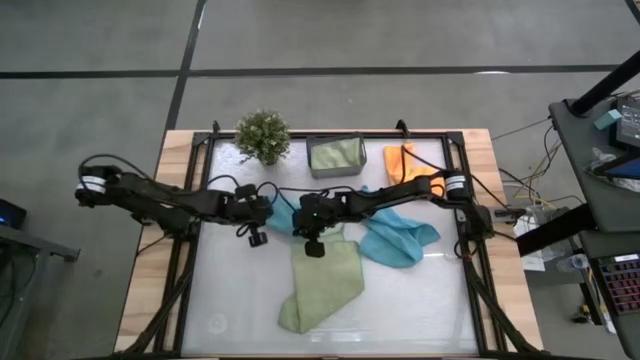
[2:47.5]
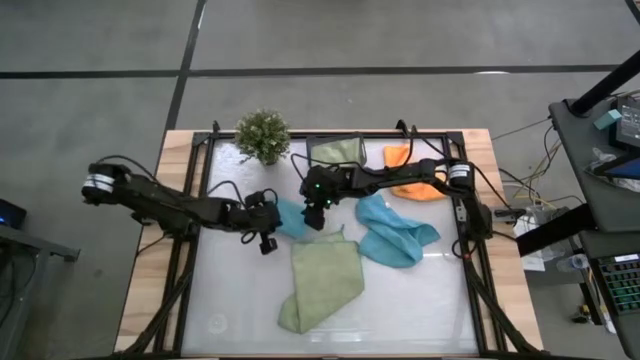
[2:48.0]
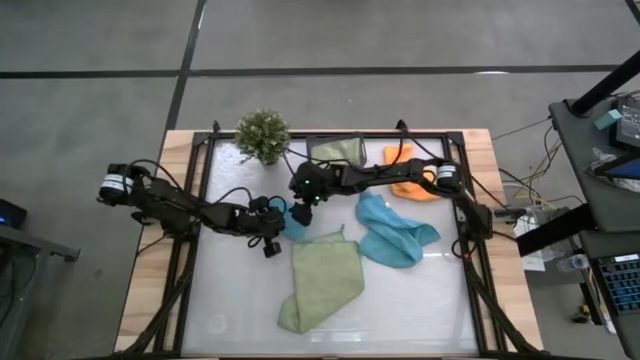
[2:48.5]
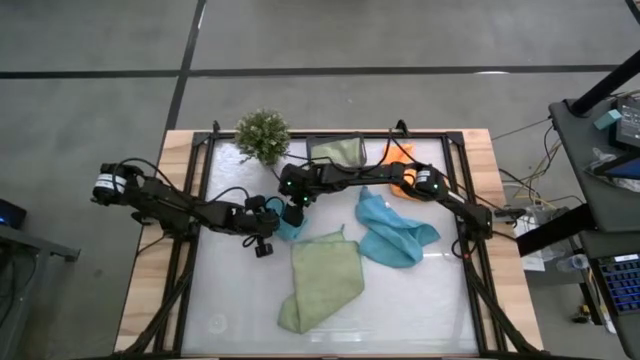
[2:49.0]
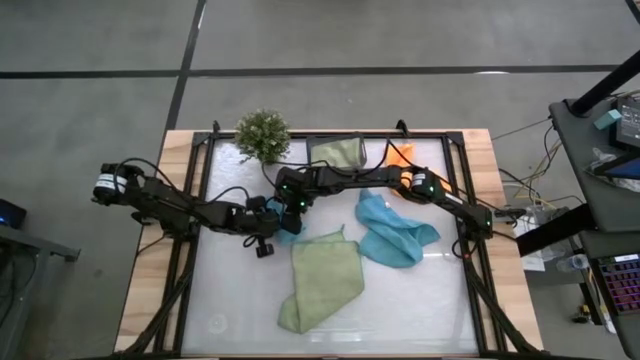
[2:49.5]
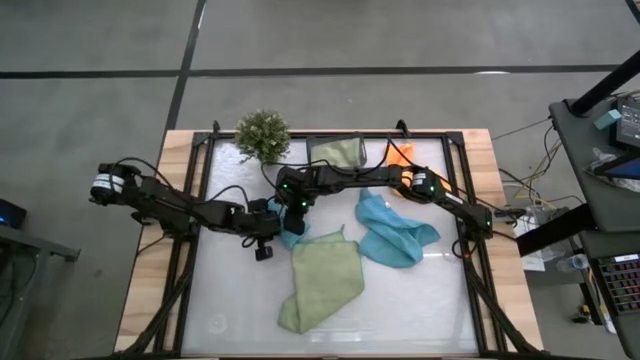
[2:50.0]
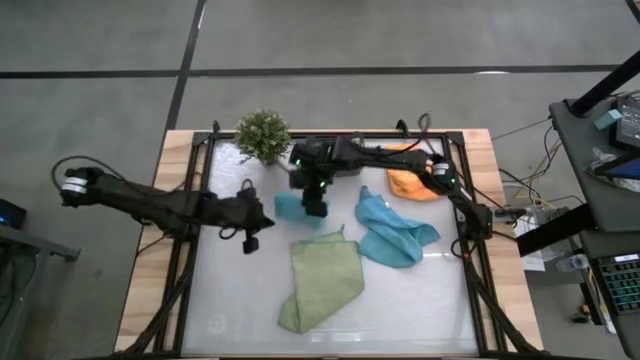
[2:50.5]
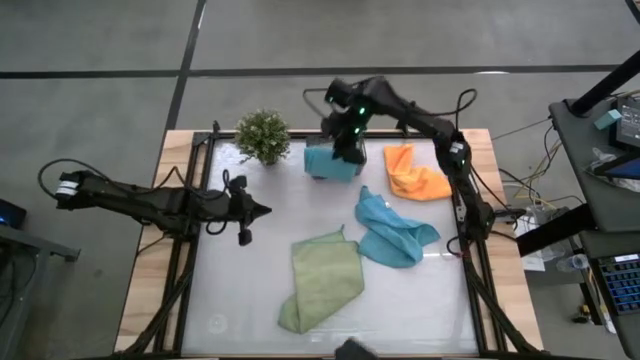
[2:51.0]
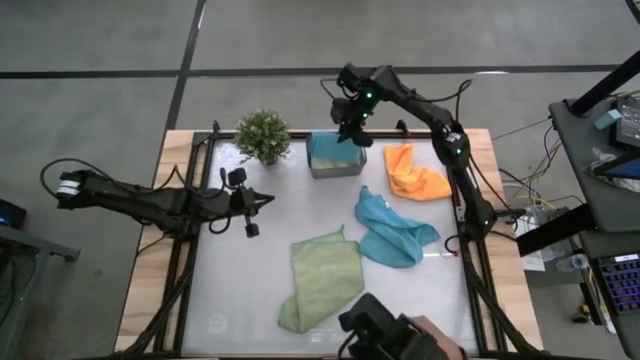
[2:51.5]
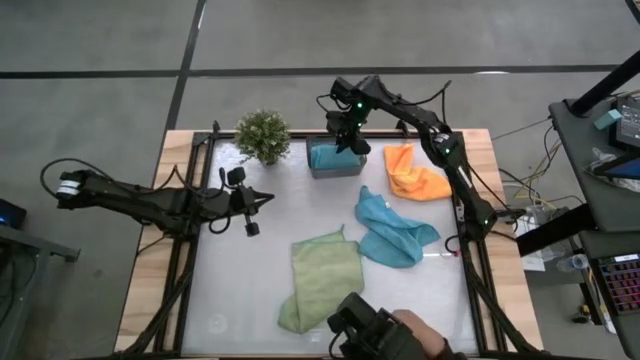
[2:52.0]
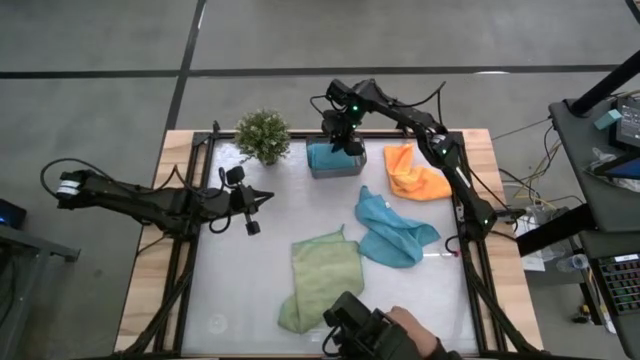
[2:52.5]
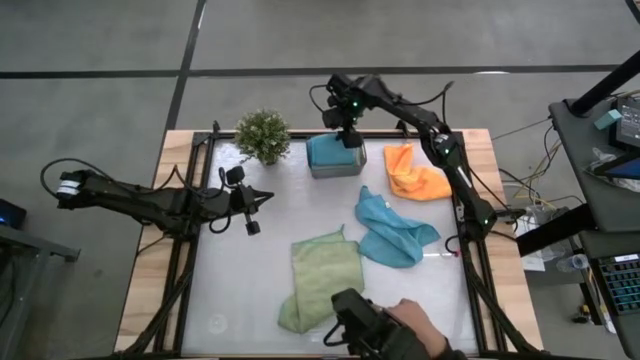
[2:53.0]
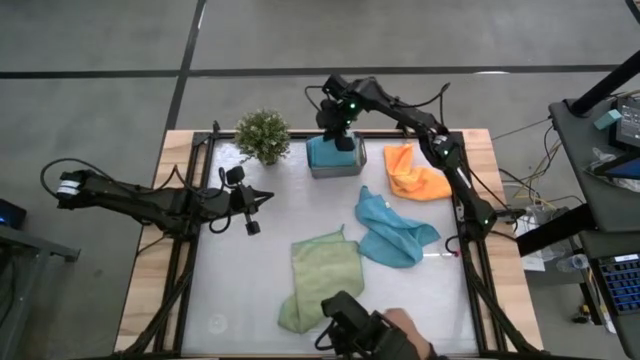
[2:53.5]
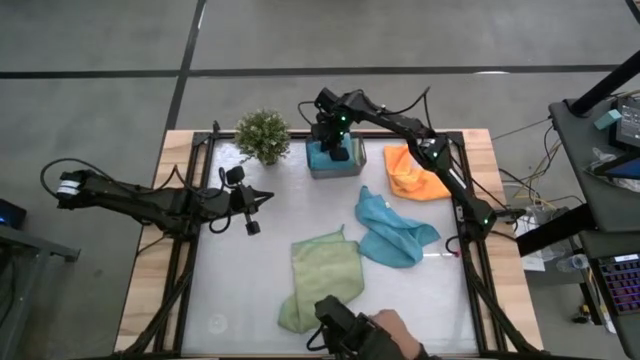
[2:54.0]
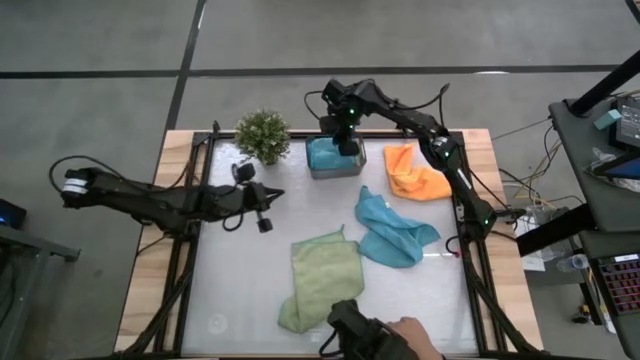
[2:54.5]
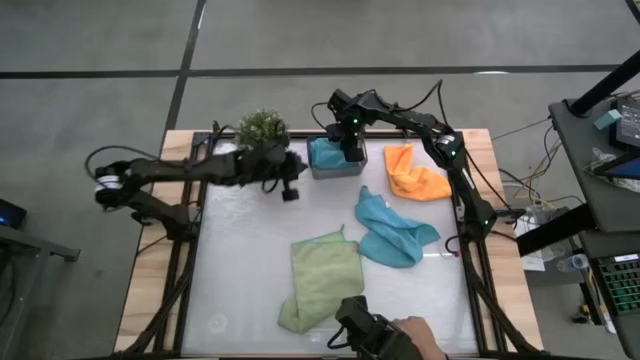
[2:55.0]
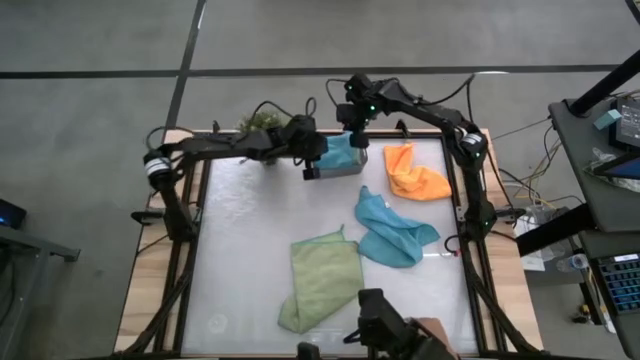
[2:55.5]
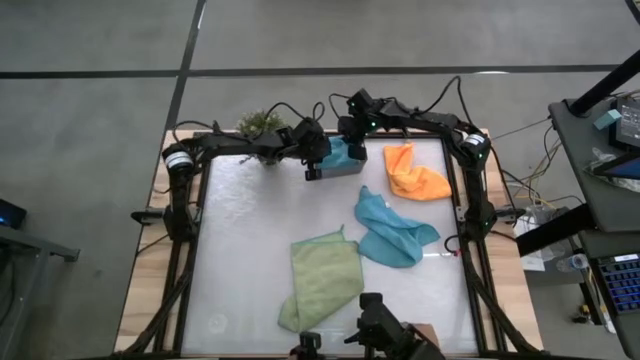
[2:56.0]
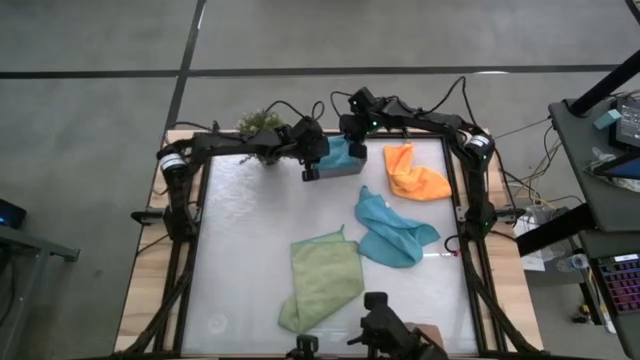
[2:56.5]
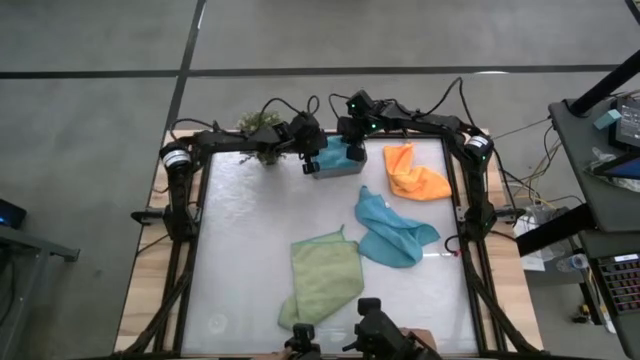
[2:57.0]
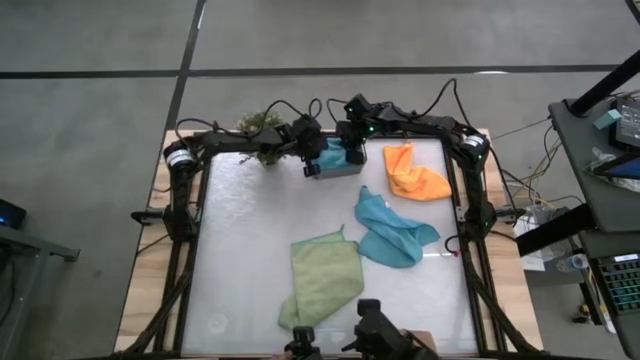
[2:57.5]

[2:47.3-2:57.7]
Task: Fold microfiber towels
Stack the folded blue towel on top of the folded green towel into the black bin

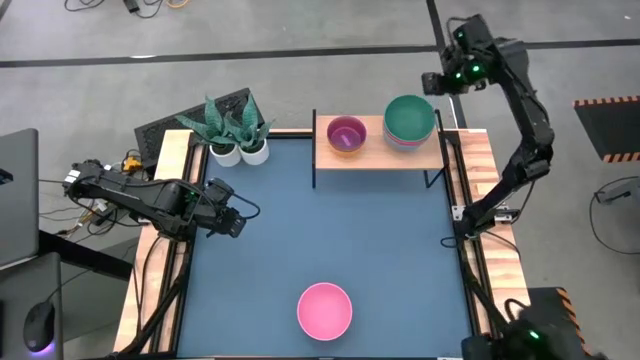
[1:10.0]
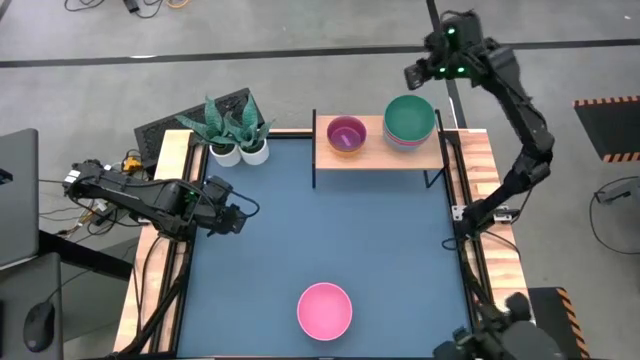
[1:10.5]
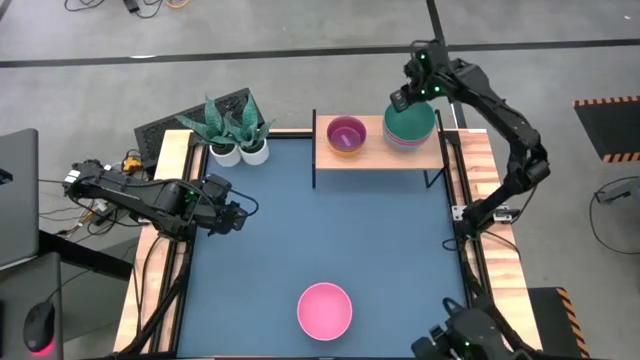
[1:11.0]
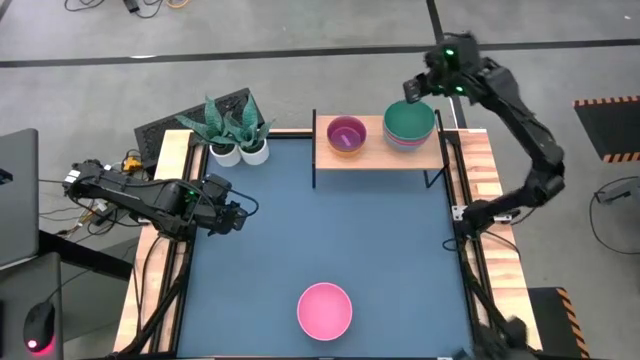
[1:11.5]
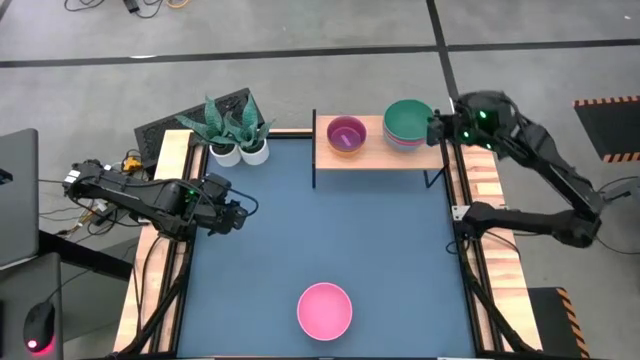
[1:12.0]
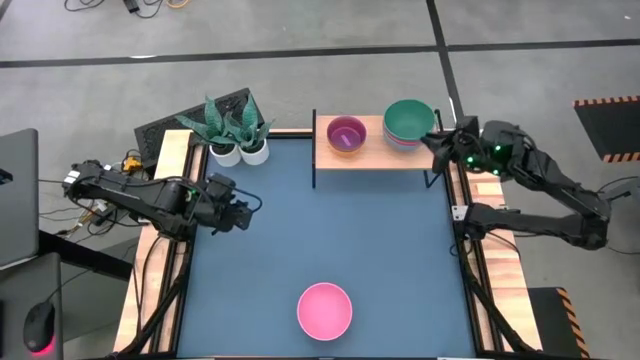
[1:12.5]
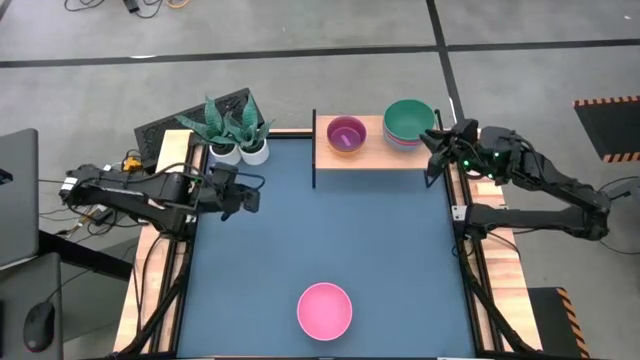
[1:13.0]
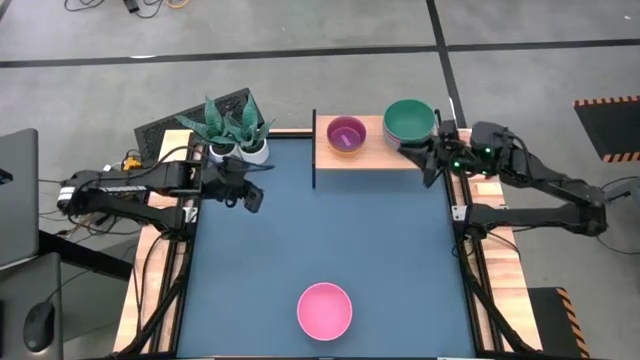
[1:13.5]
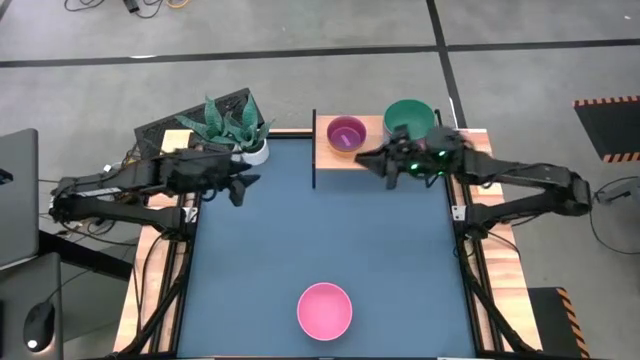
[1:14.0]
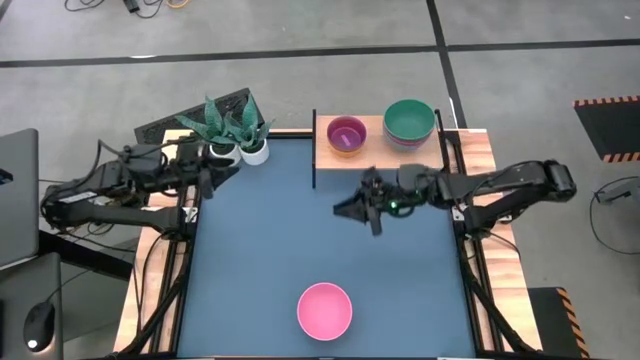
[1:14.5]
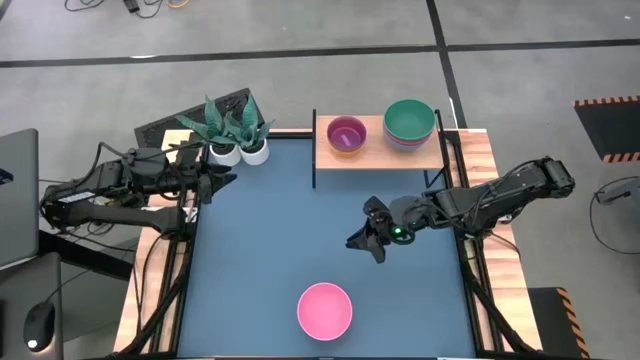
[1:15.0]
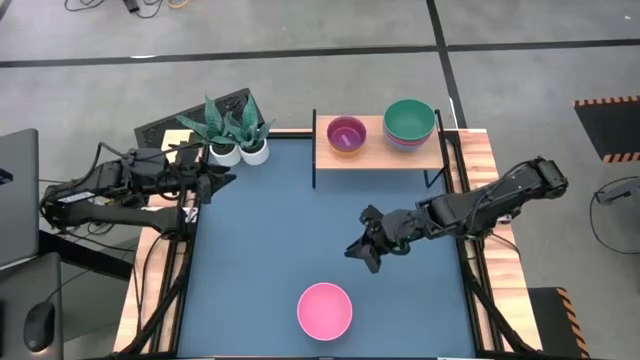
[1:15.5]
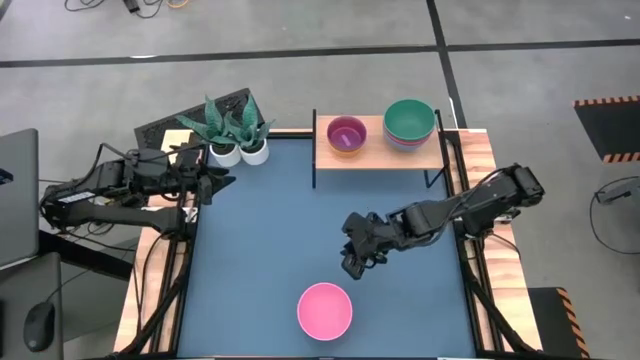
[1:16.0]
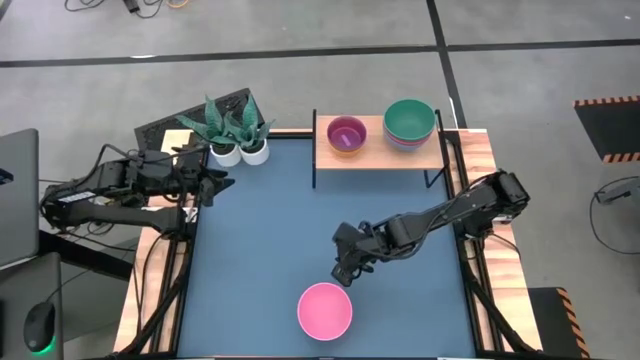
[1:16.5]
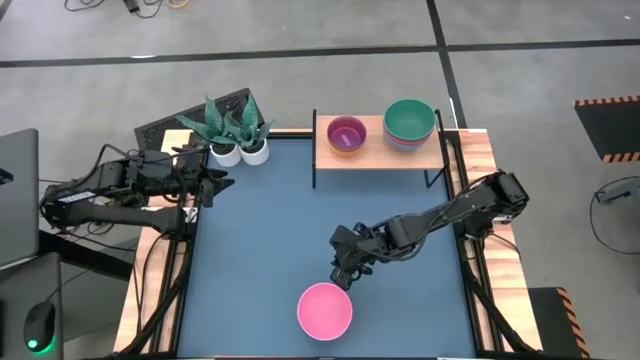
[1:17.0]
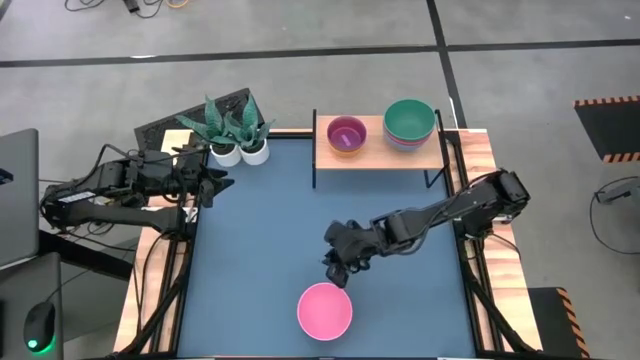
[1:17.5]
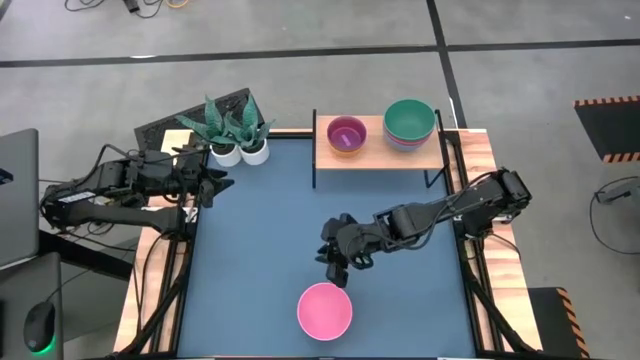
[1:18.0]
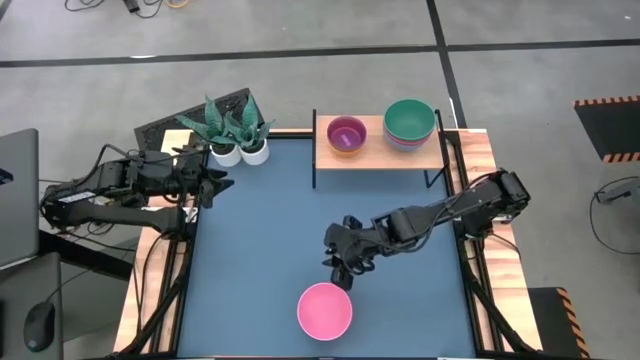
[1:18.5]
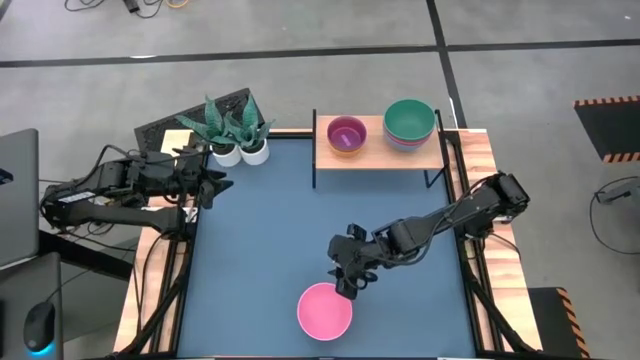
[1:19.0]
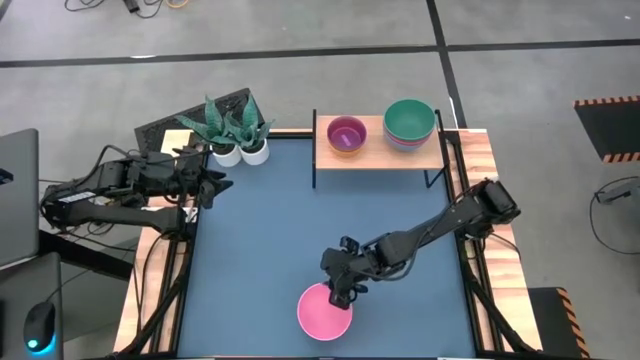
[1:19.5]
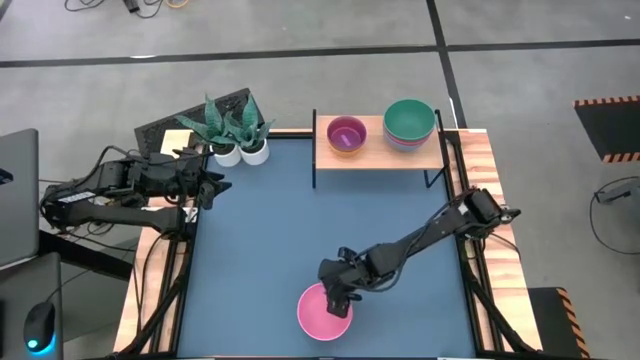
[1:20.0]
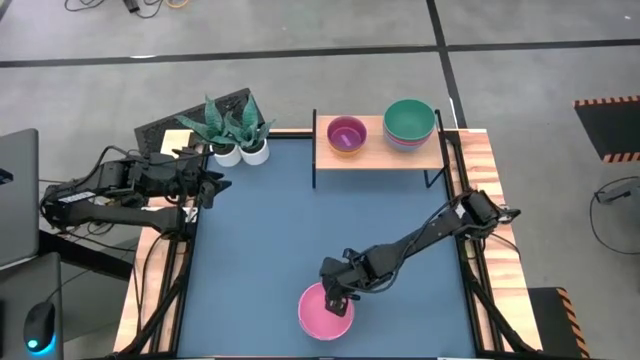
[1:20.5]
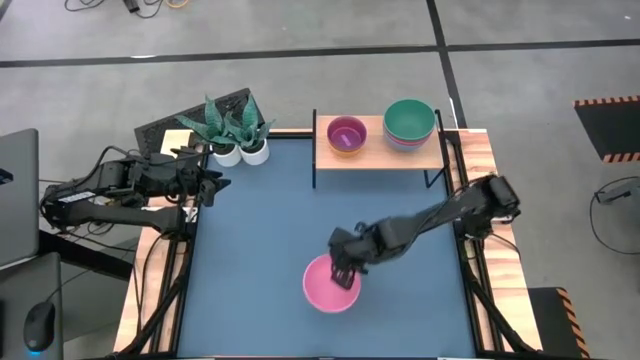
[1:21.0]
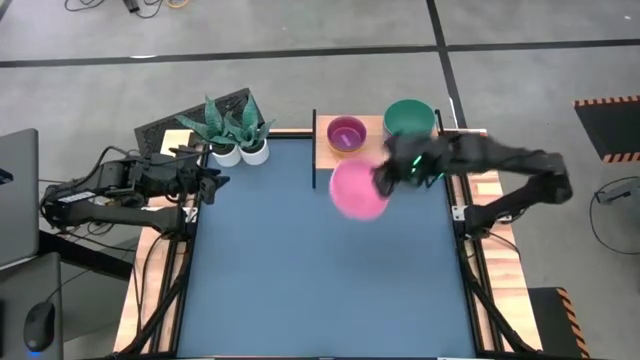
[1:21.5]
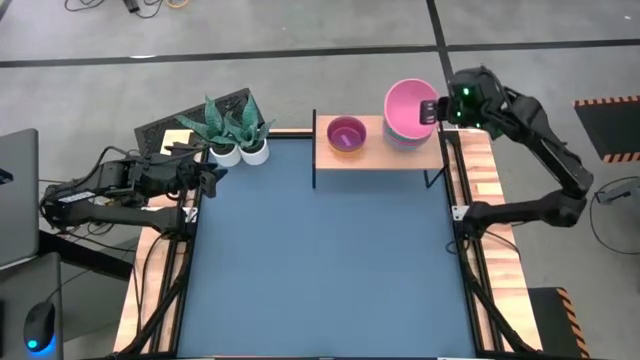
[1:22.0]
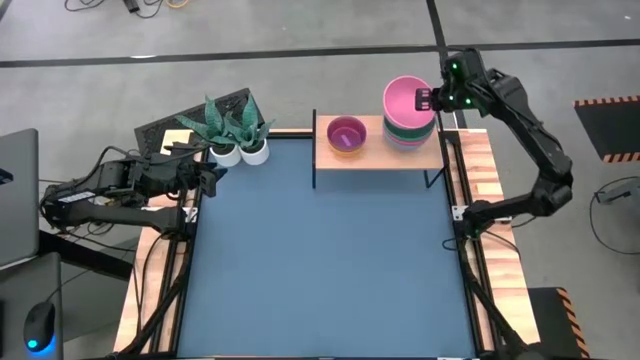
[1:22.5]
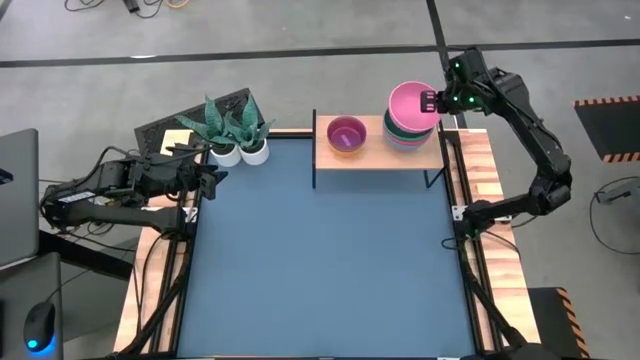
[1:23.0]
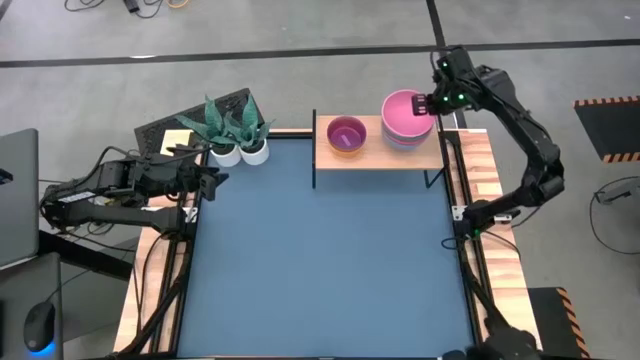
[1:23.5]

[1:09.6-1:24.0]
Task: Place and stack bowls onto a shelf
Stack the pink bowl on top of the green bowl on the shelf
